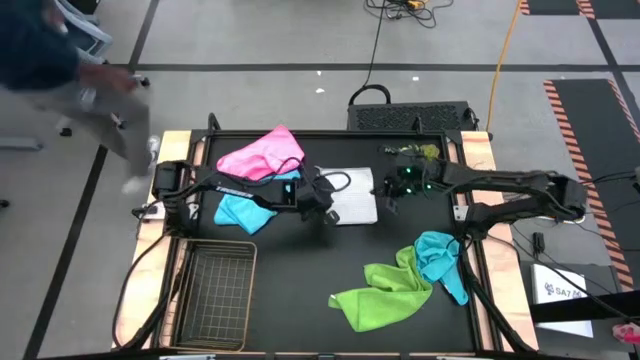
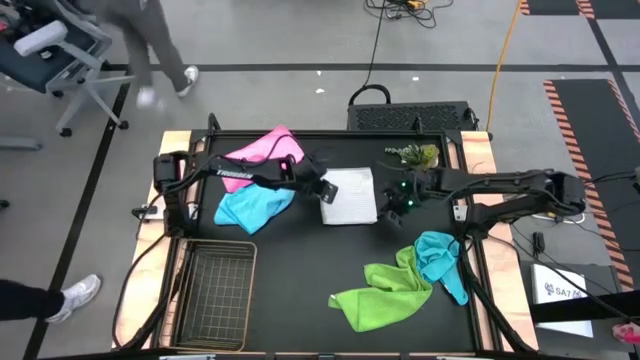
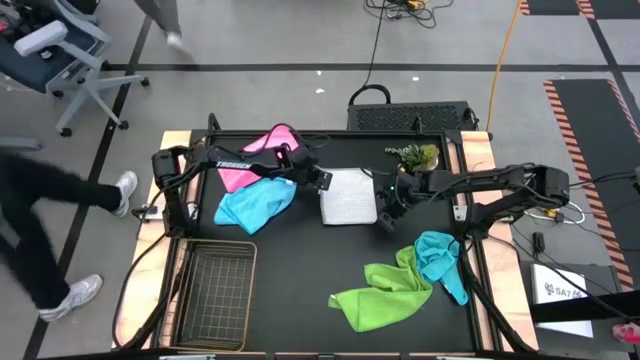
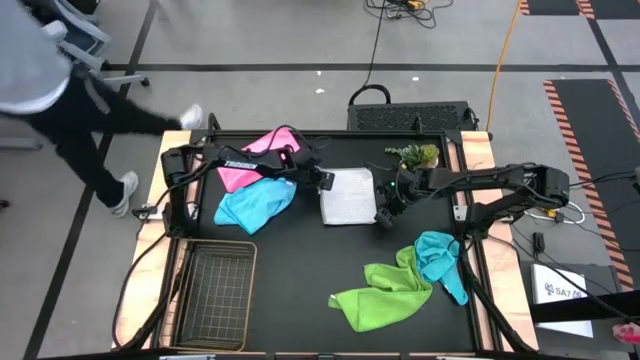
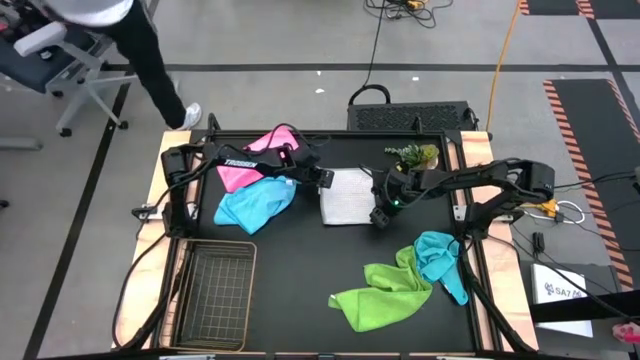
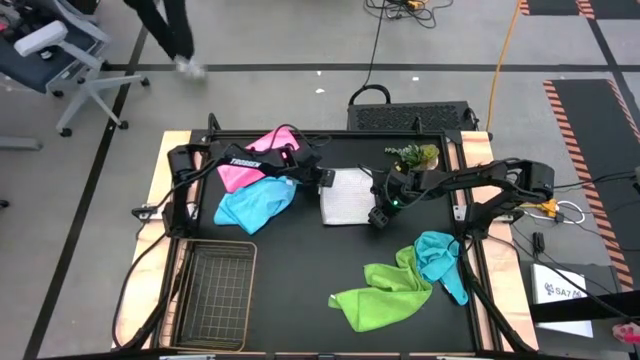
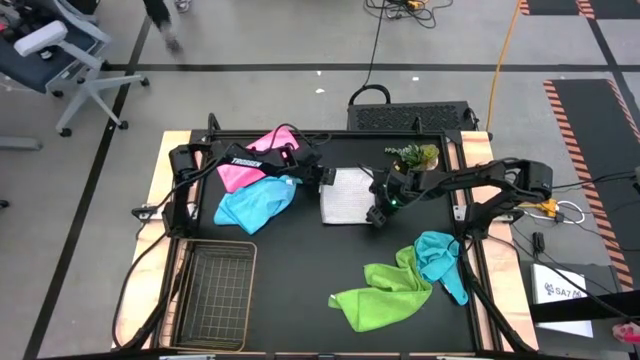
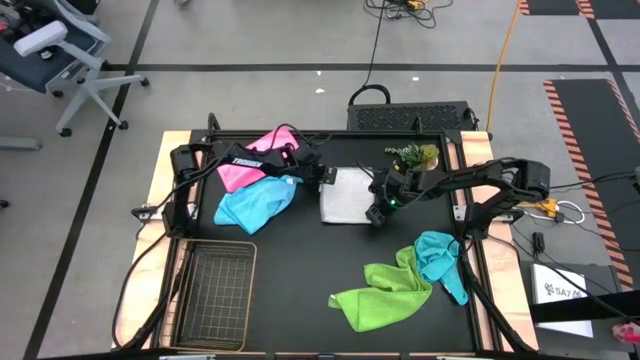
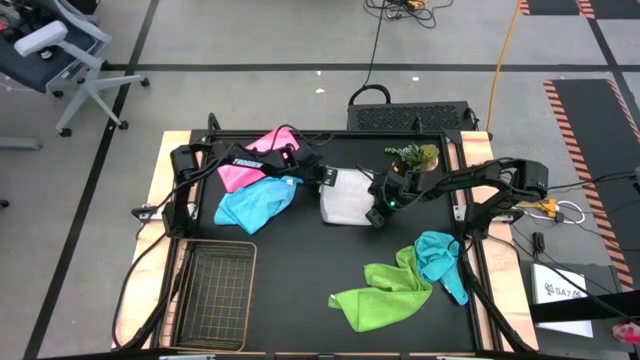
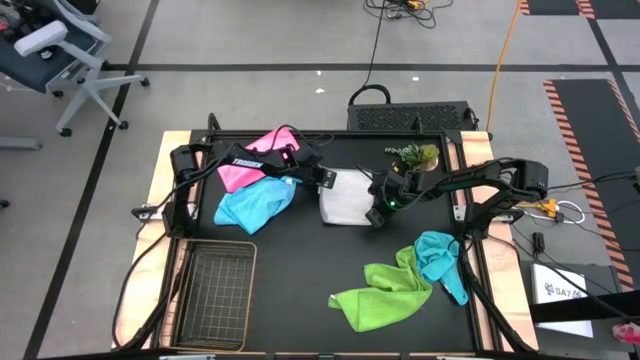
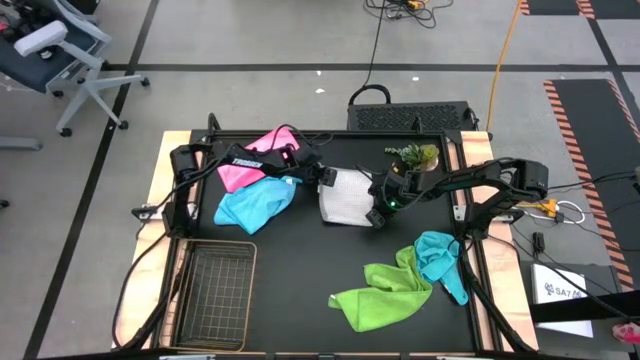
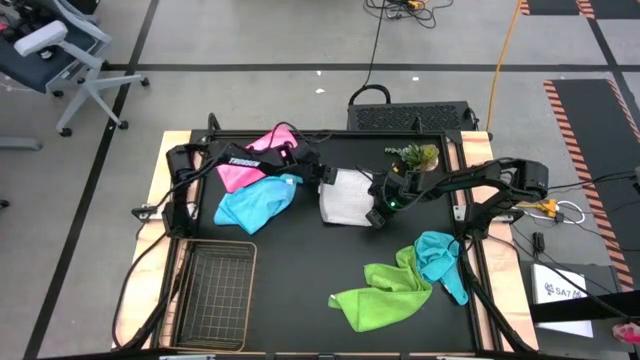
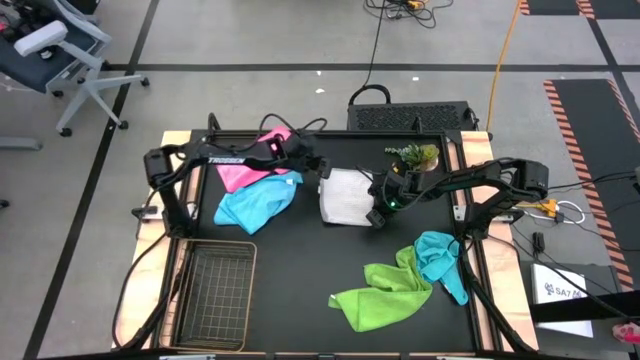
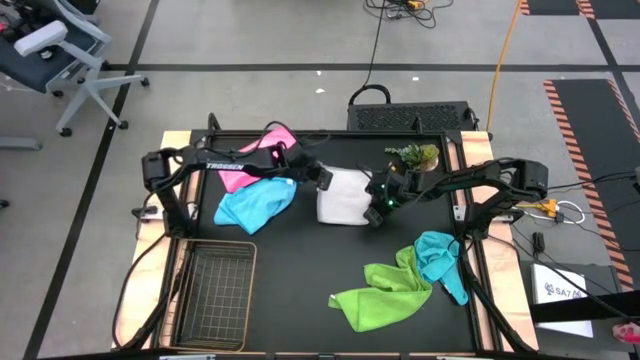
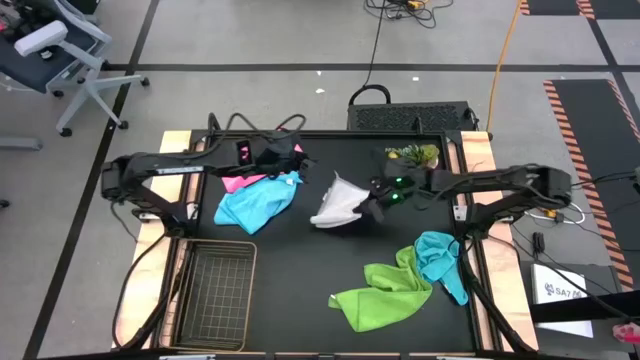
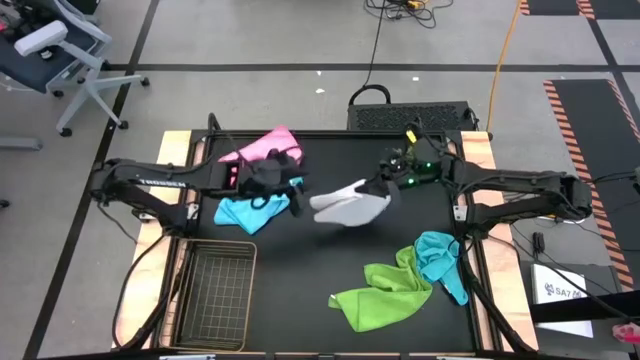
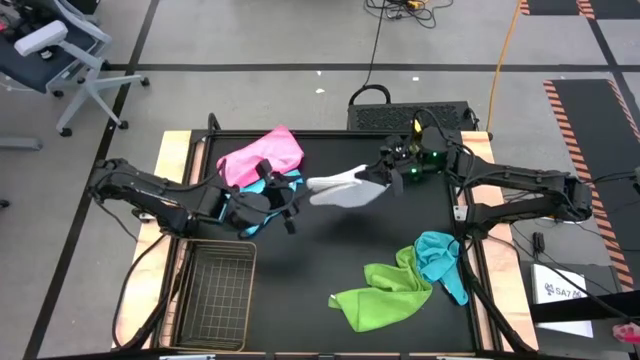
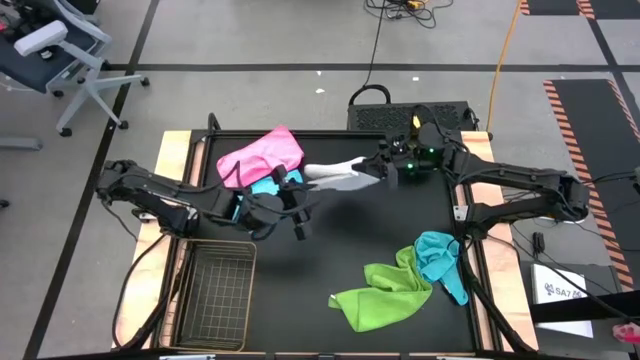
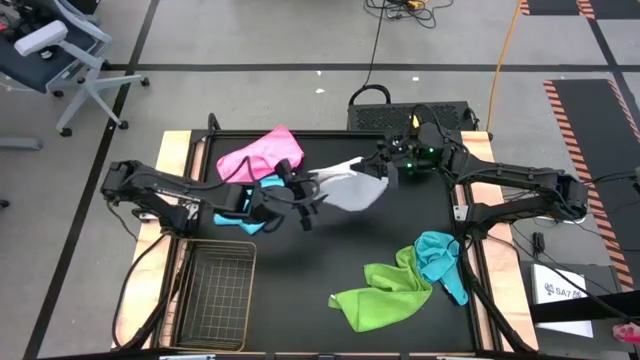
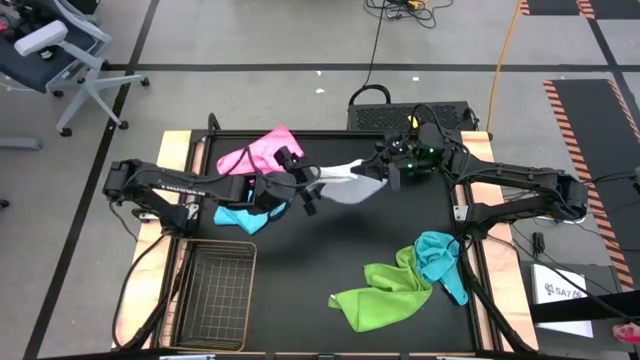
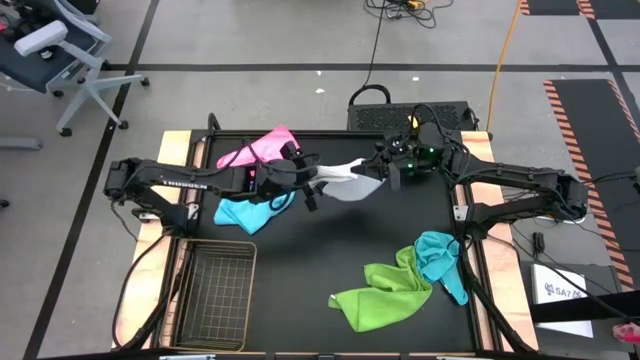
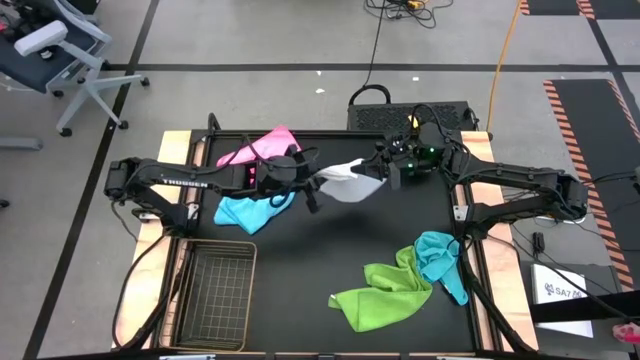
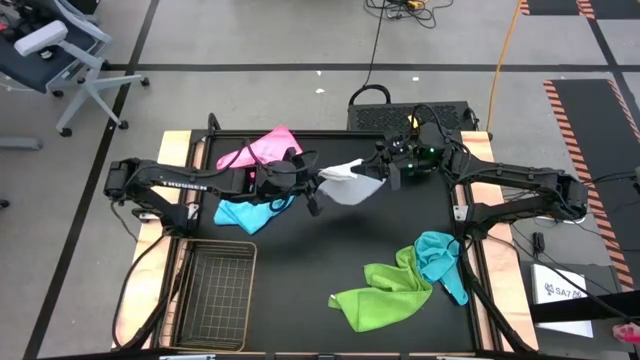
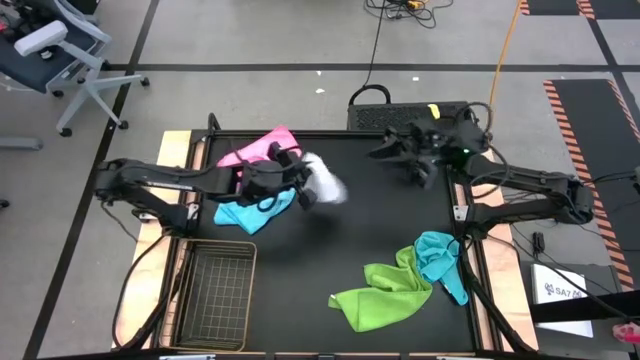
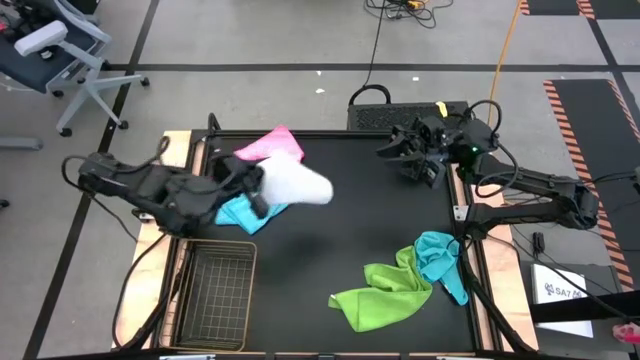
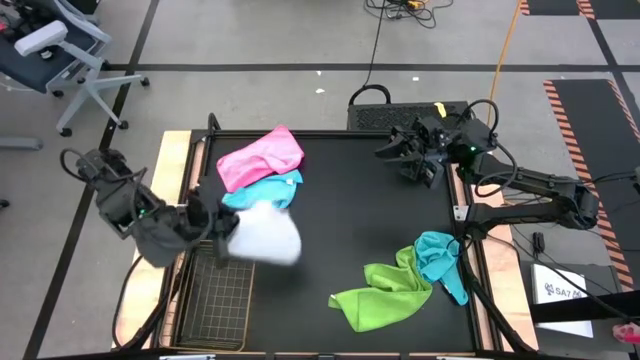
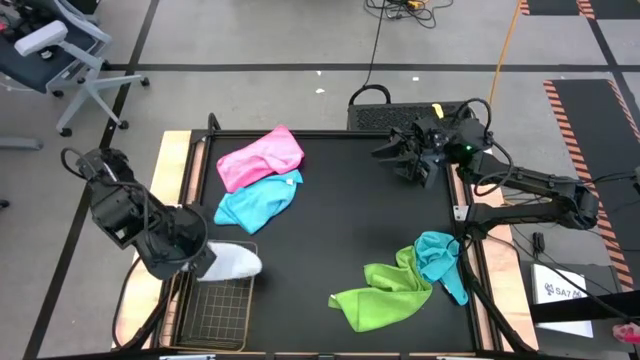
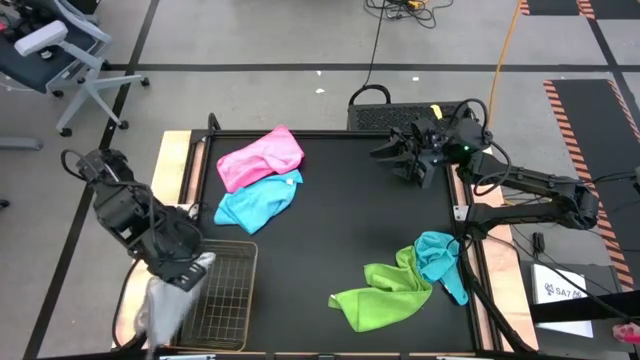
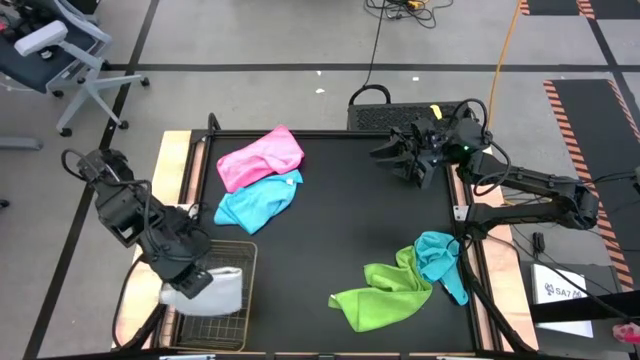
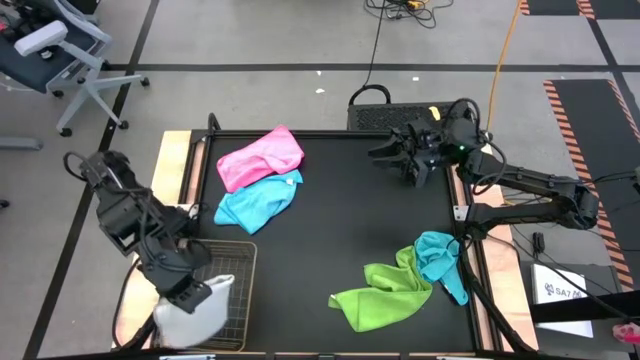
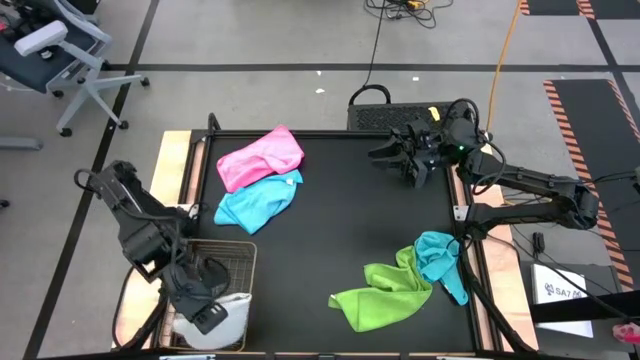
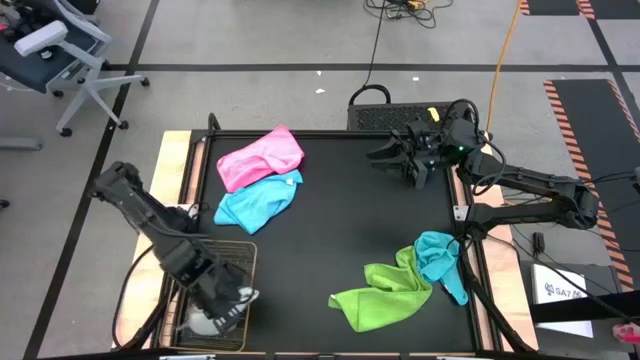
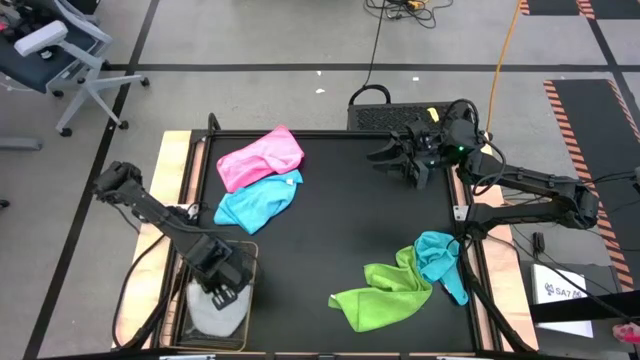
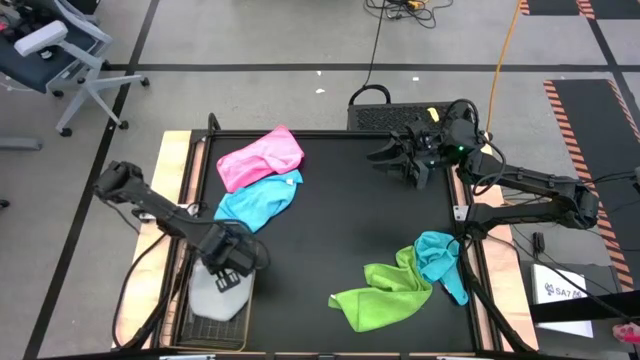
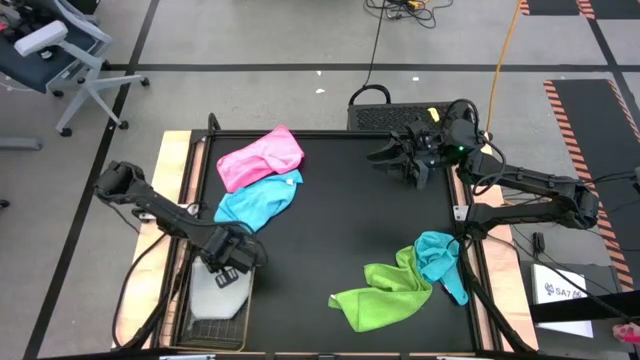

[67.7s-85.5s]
Task: Fold microfiber towels
Put the folded gray microfiber cloth into the wire basket

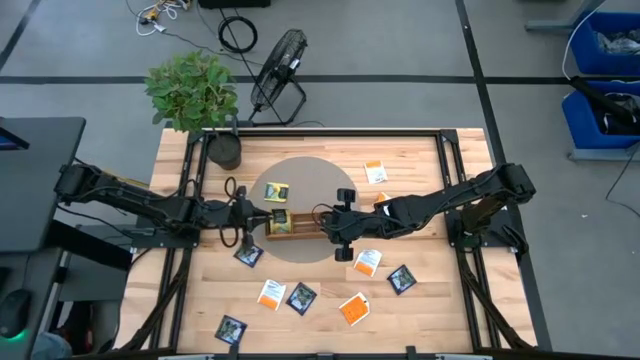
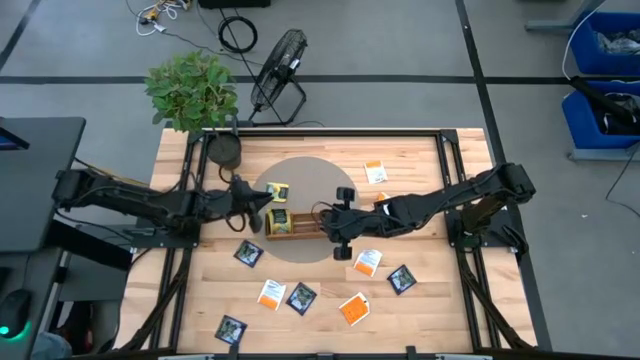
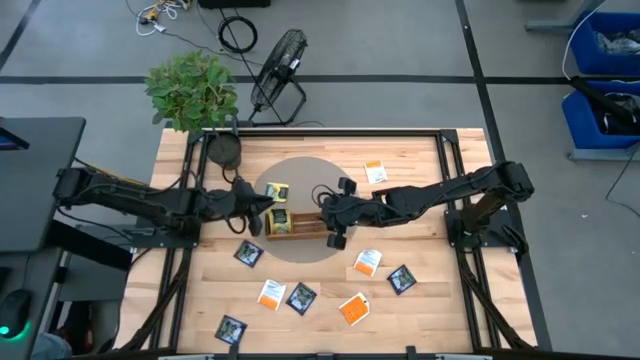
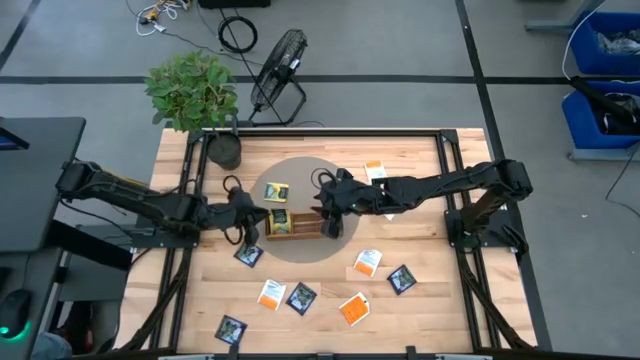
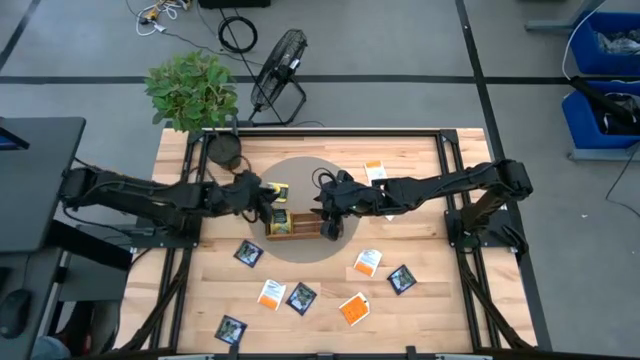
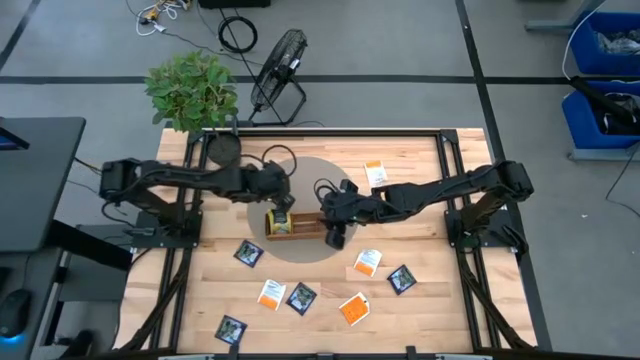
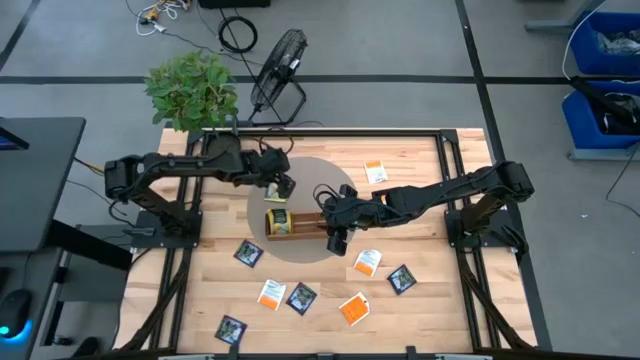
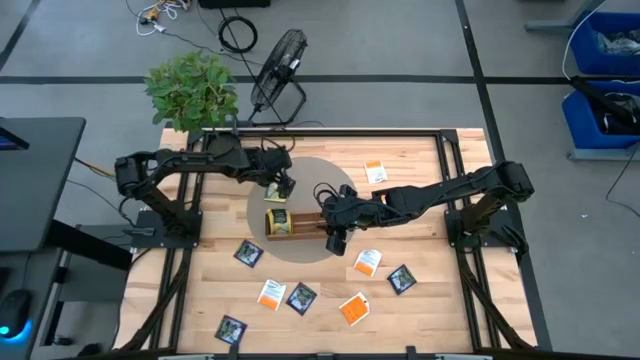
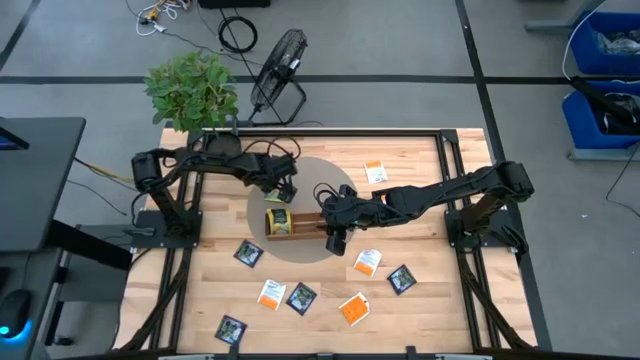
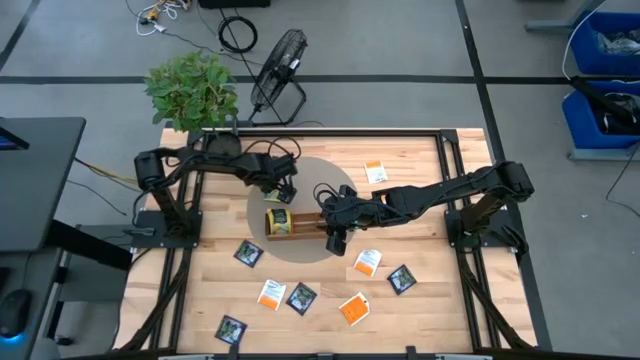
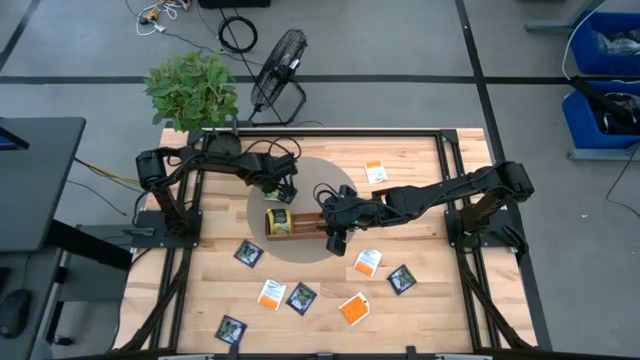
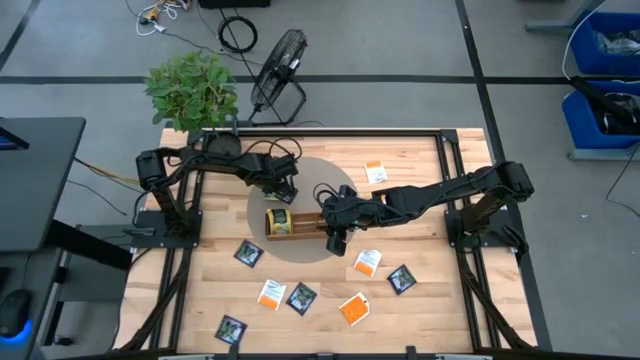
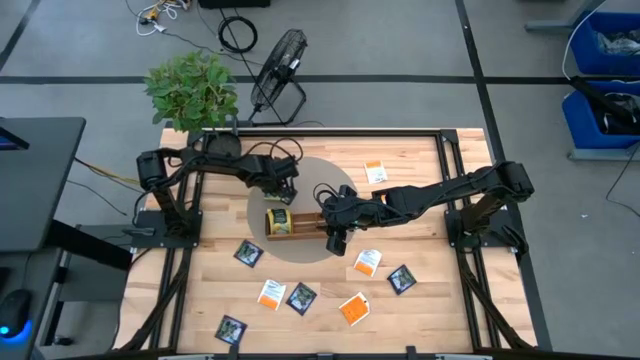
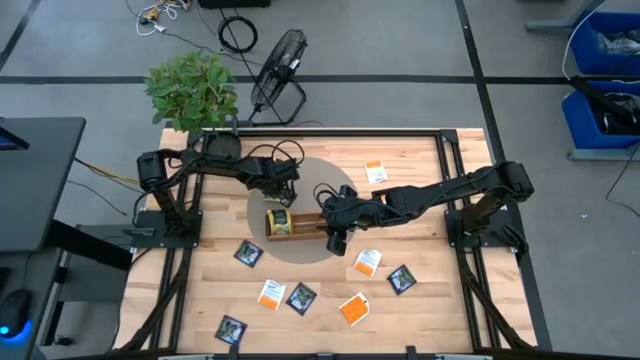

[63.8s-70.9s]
Task: Pick & Place Tea
Put the yellow tea bag into the wooden organizer
